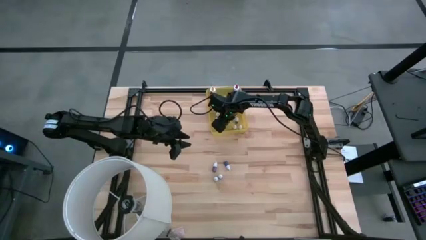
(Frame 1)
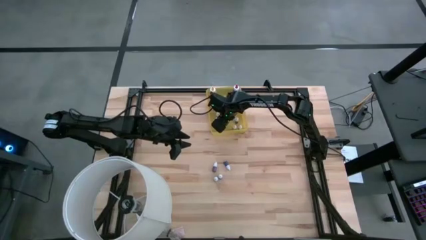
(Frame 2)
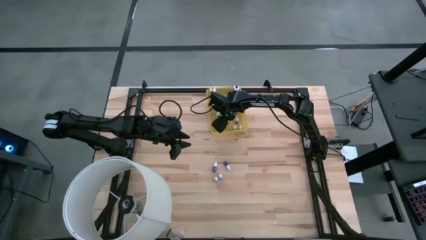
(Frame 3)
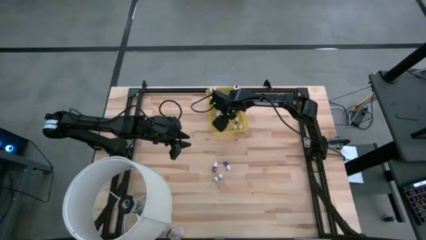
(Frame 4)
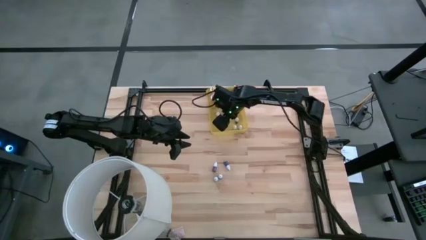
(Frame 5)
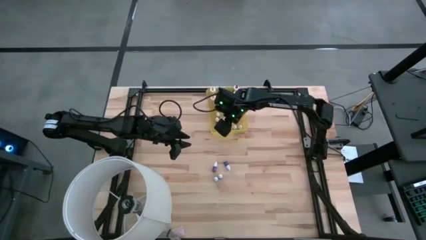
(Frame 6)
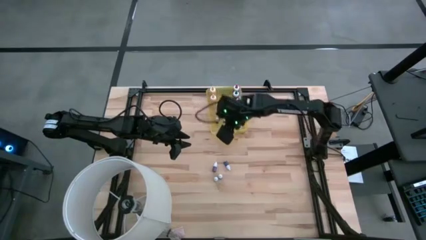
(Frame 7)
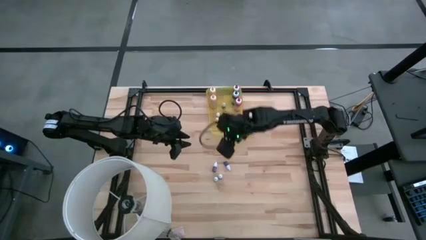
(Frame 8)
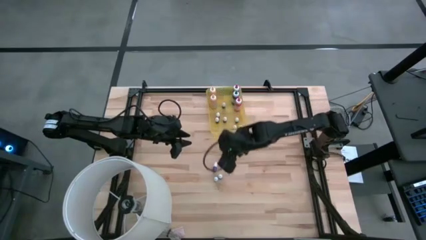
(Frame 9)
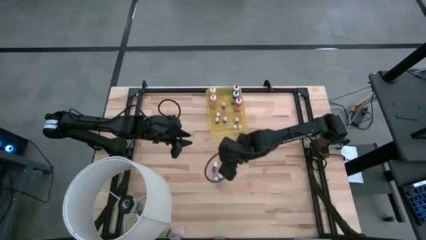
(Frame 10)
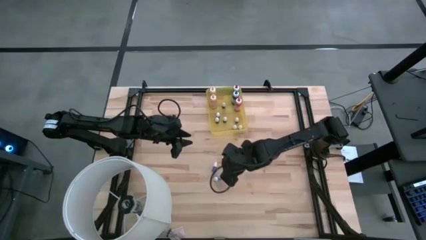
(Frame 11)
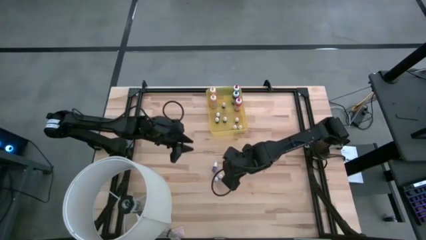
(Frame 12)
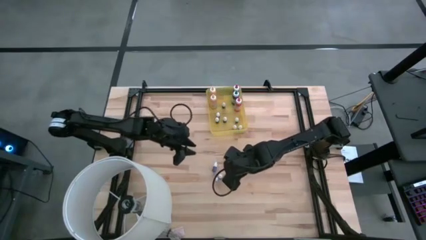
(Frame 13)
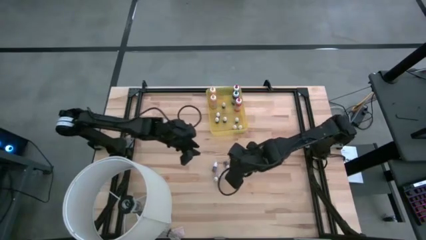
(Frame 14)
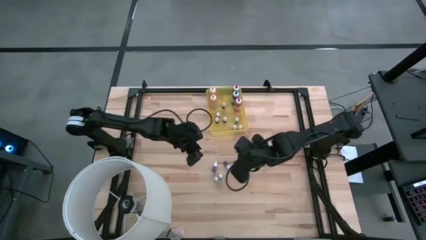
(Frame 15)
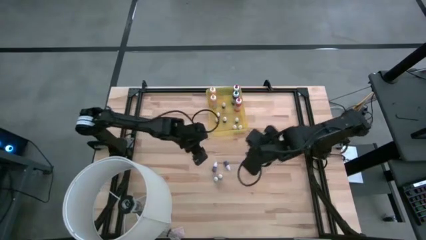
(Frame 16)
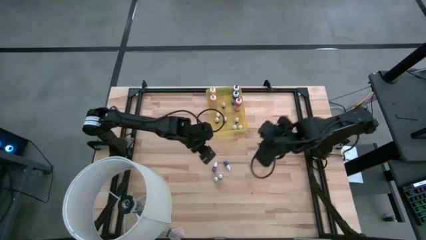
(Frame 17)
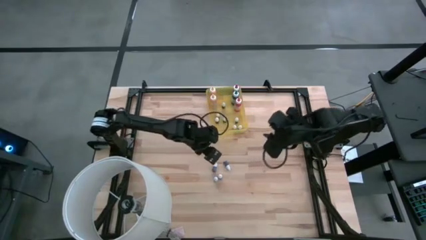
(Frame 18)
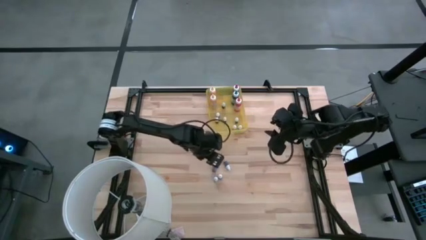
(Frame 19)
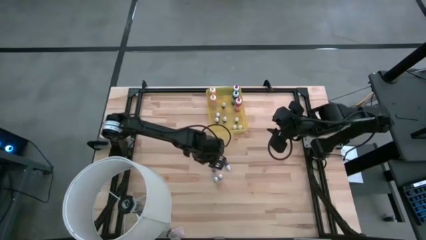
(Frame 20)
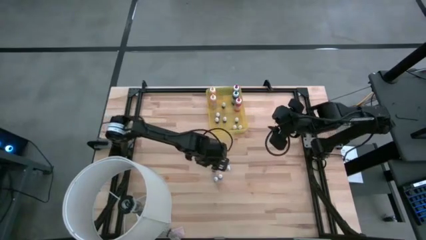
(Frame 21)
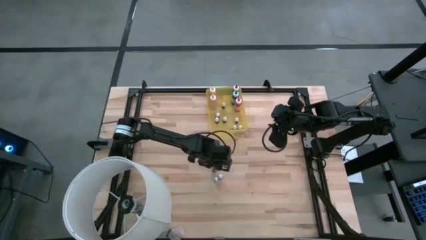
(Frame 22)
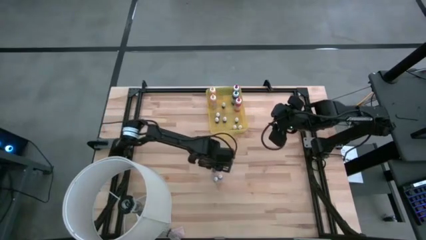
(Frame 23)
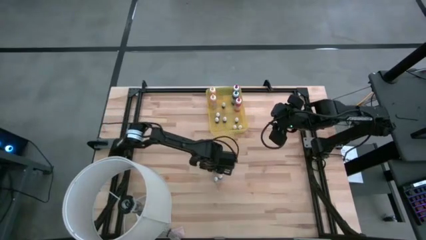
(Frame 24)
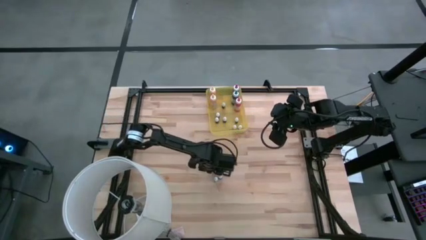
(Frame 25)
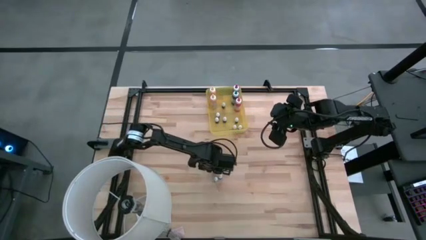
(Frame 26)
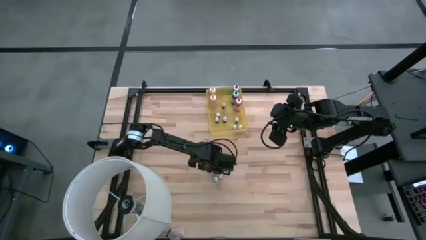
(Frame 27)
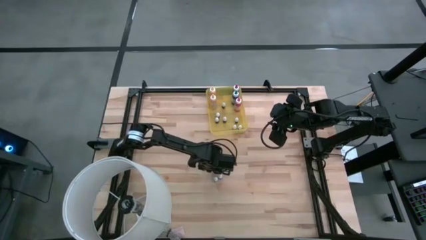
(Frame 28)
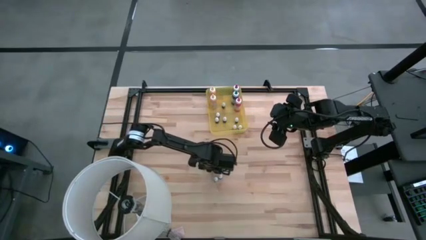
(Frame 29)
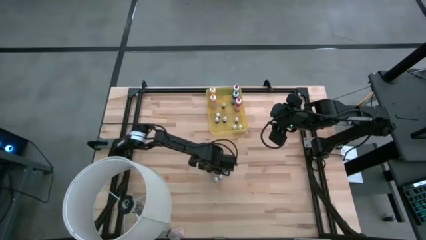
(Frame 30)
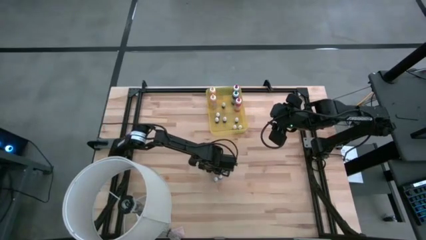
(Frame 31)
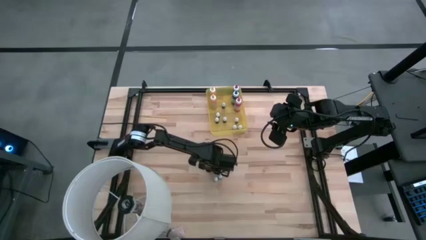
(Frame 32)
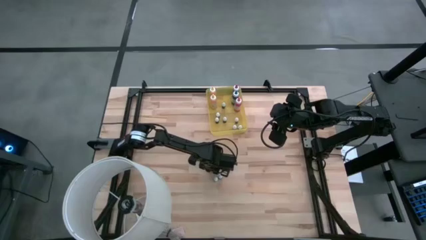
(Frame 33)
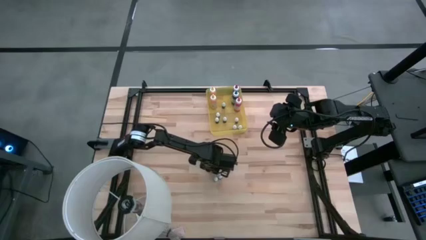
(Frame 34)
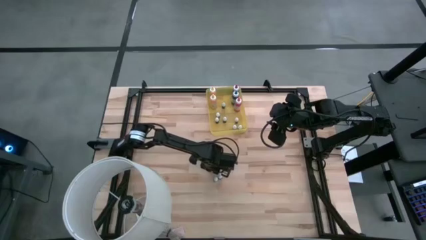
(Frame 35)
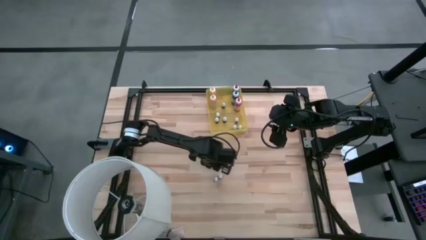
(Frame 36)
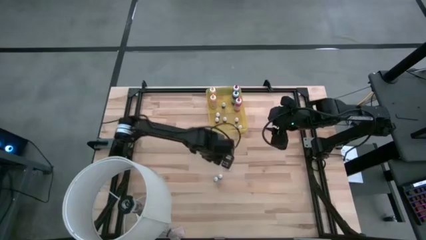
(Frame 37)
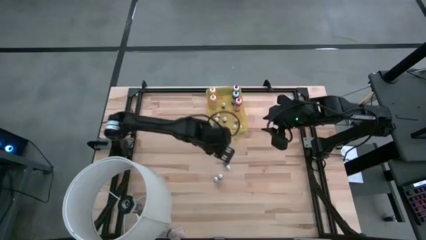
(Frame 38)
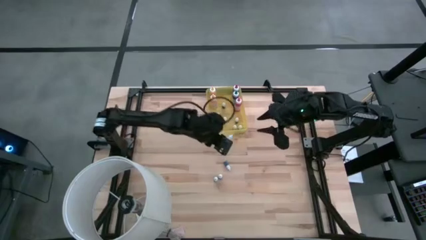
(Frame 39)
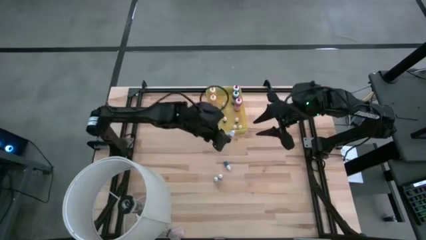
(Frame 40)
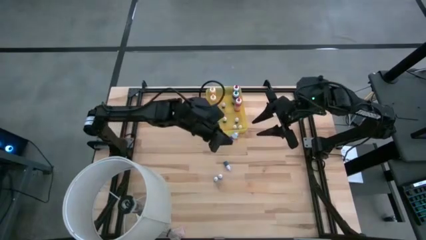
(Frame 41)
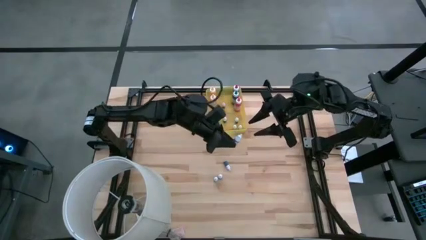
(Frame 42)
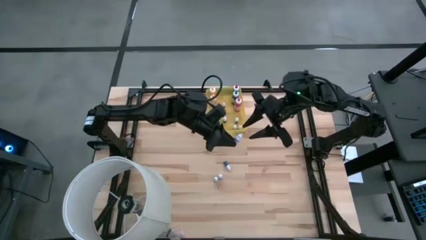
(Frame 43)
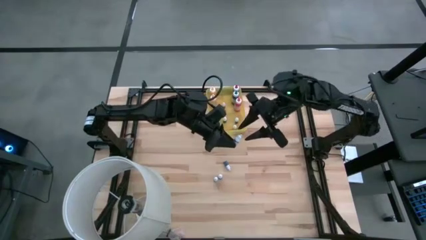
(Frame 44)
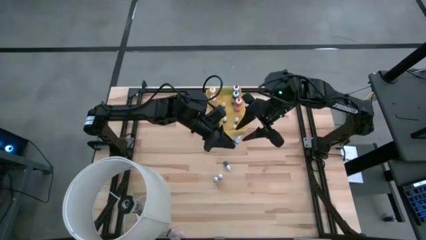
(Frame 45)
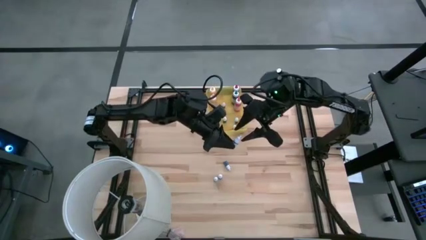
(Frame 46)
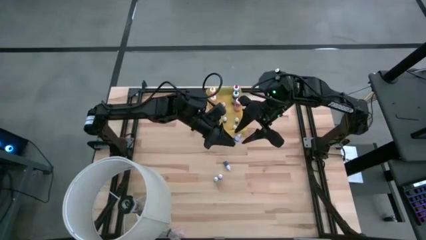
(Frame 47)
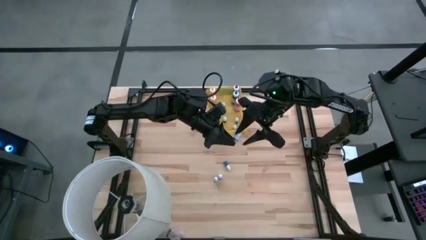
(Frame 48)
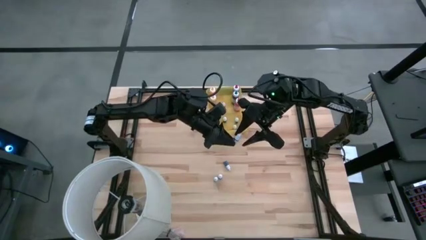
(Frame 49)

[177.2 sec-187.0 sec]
Task: Pick & Place food coloring
Put the small purple food coloring bottle into the yellow bin

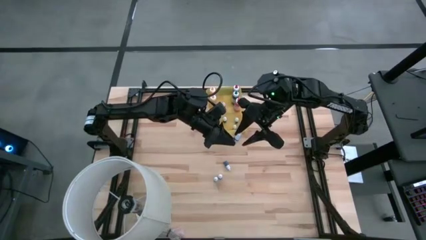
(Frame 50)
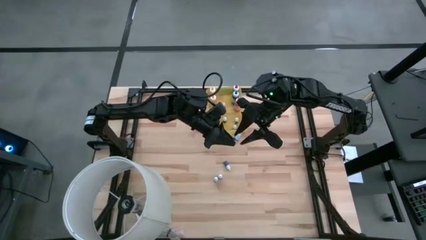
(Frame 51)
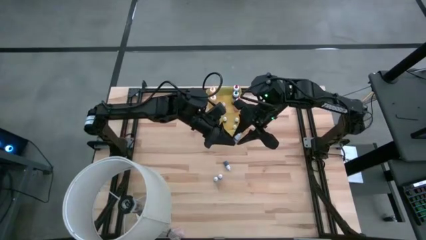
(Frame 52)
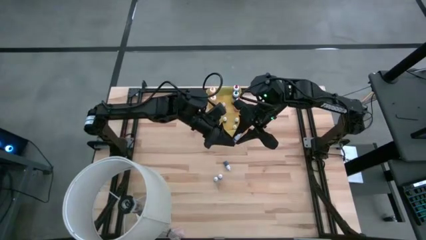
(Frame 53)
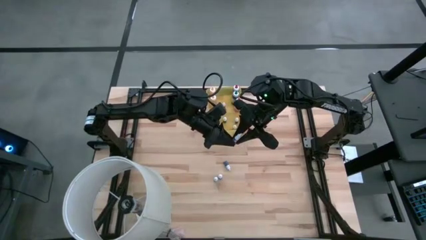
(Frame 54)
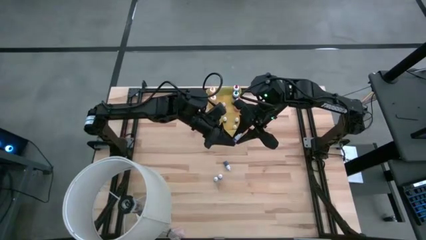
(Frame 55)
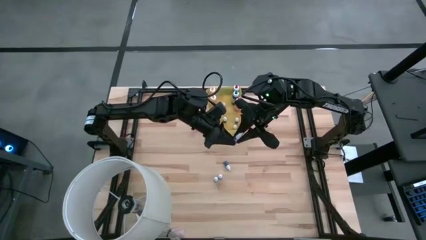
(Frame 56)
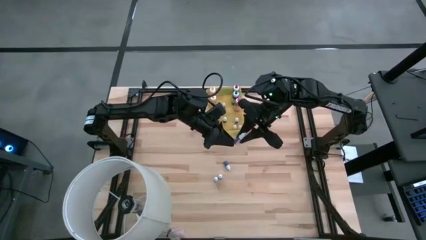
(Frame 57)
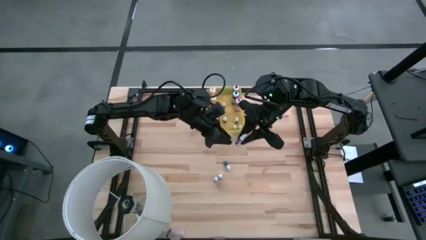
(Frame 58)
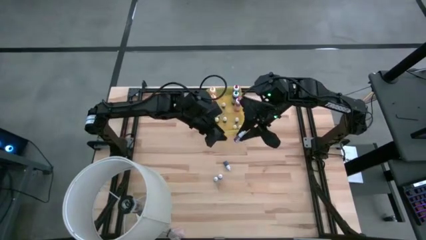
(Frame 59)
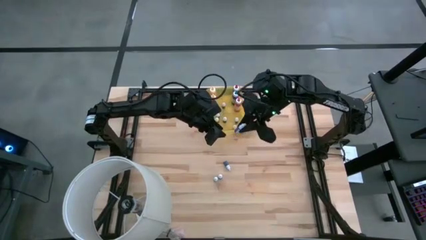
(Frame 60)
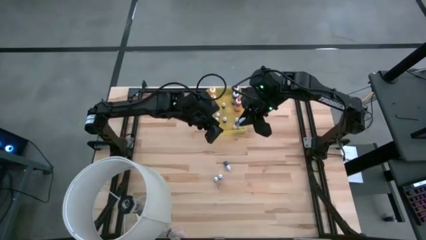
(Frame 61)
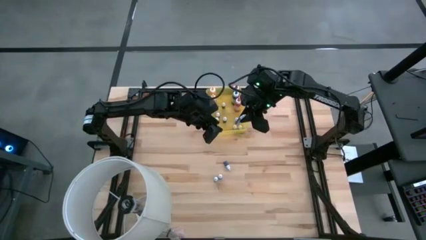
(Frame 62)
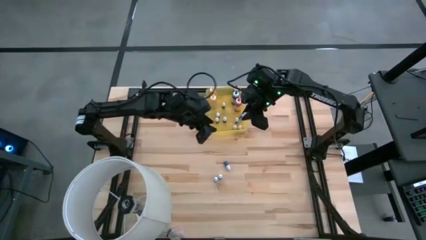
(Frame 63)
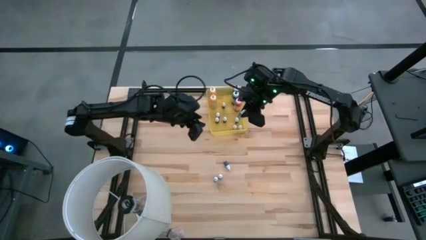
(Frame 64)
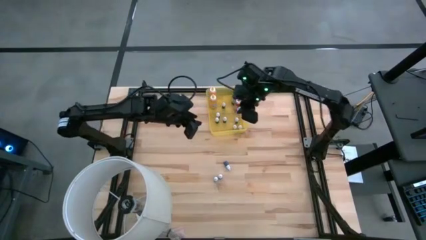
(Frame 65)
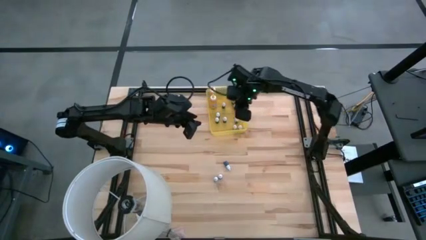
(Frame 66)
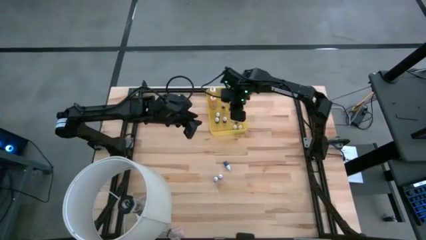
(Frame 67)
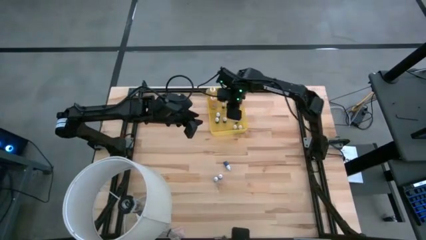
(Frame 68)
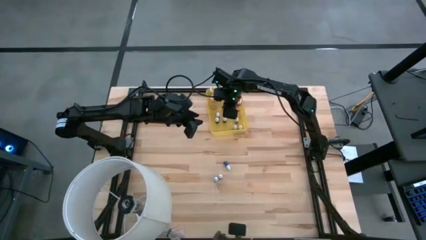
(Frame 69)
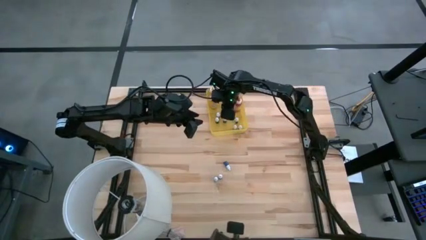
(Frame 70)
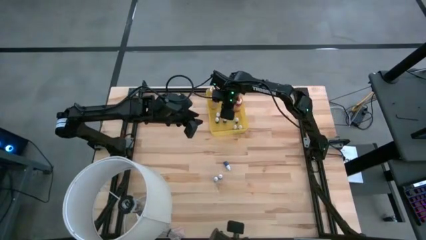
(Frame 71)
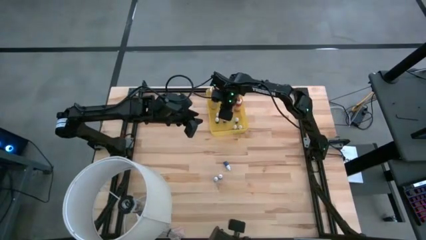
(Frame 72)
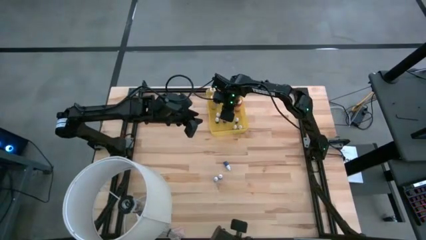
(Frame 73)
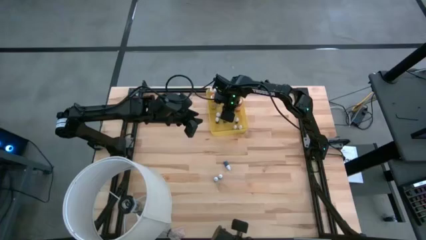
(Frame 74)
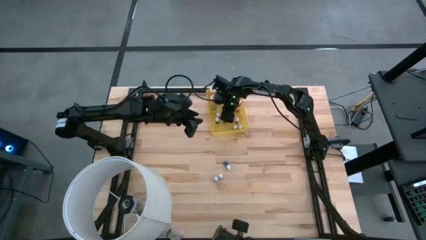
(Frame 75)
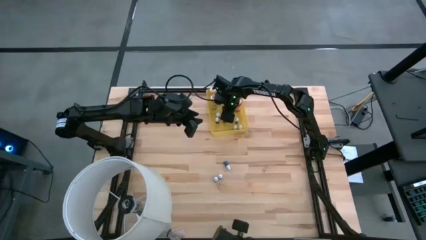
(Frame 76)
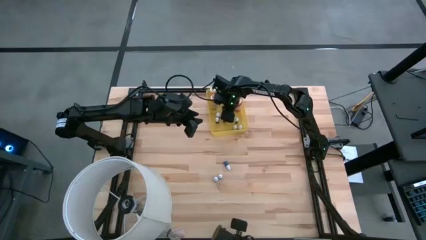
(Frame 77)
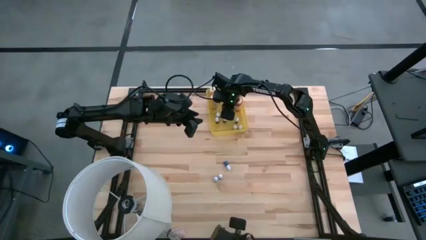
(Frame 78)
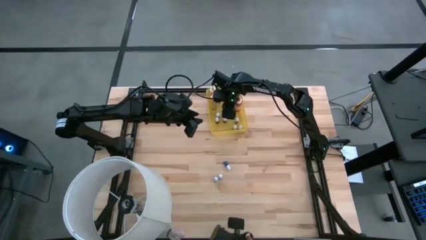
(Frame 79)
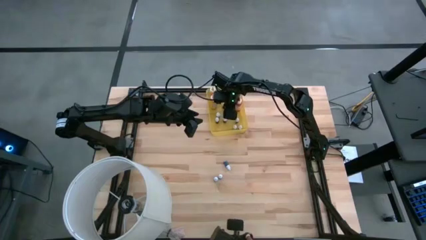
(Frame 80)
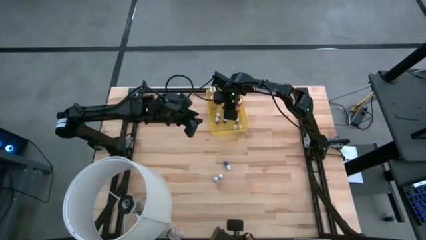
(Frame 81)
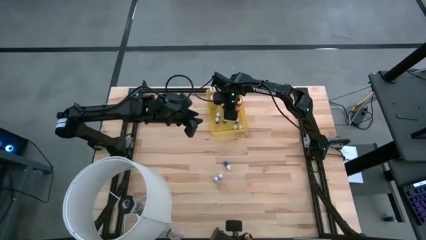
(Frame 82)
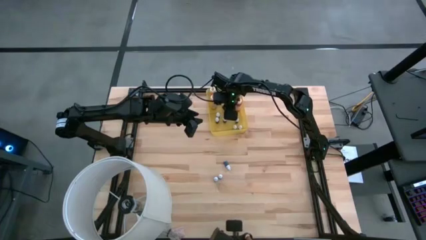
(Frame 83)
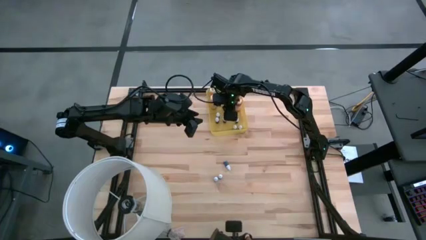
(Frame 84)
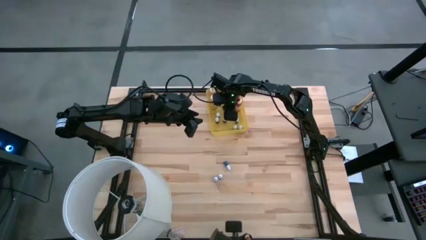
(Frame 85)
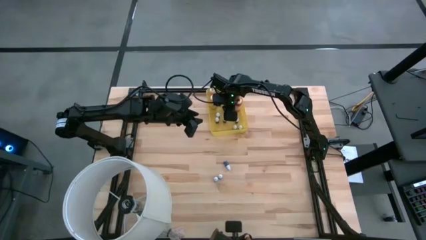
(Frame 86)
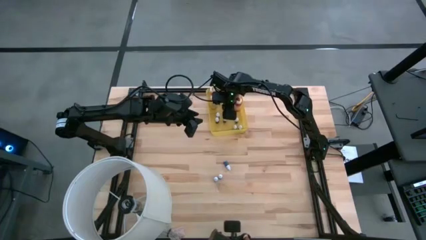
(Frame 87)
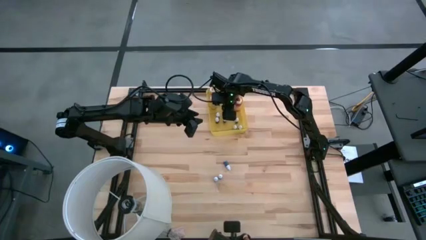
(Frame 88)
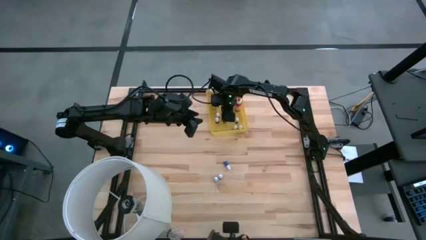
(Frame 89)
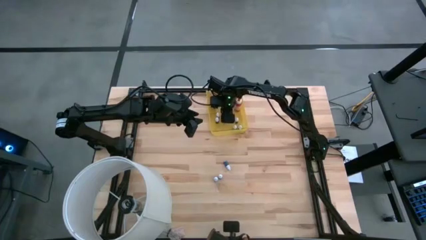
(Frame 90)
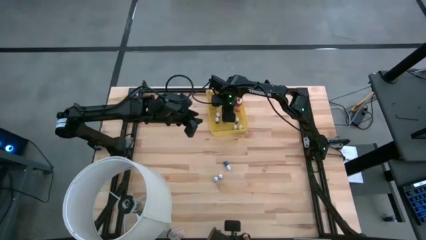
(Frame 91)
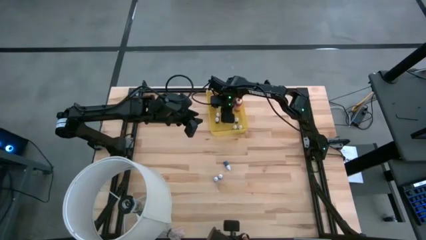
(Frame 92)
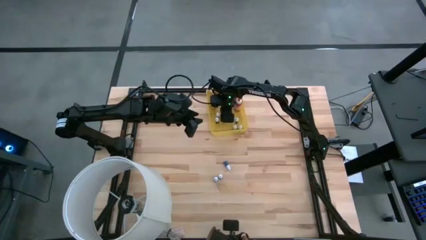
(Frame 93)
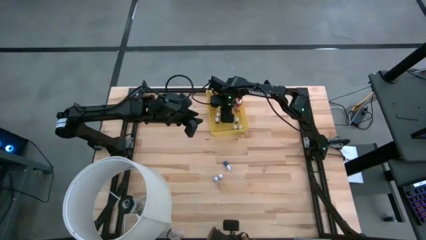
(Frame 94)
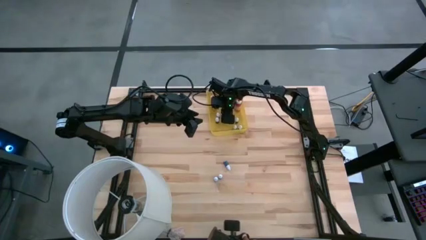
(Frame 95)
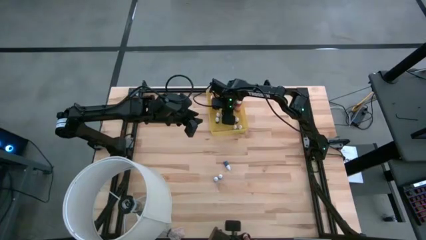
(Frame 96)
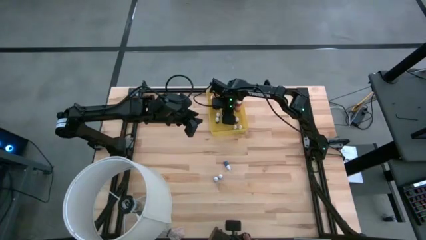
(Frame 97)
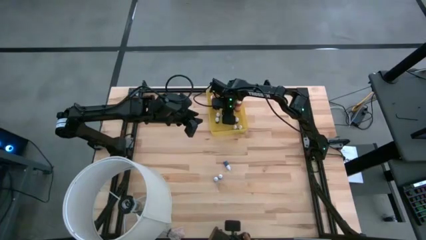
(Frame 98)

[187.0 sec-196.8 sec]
Put the small purple food coloring bottle into the yellow bin
